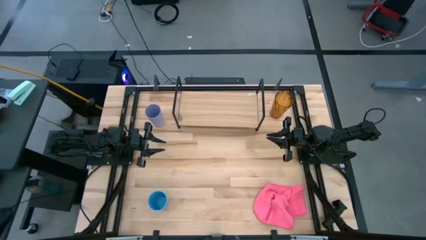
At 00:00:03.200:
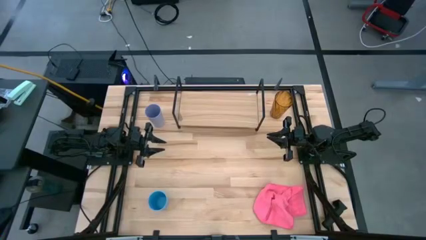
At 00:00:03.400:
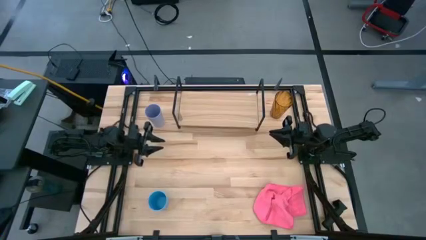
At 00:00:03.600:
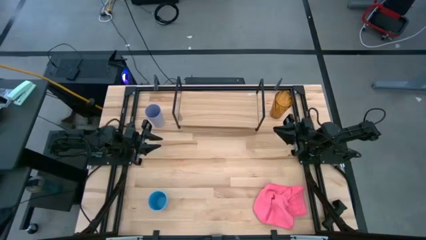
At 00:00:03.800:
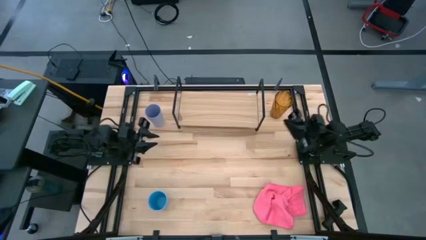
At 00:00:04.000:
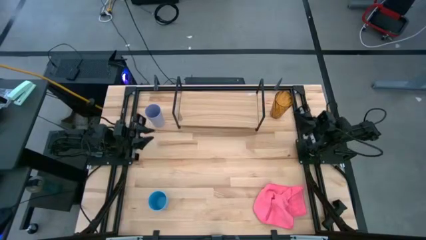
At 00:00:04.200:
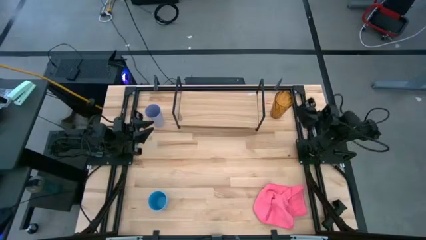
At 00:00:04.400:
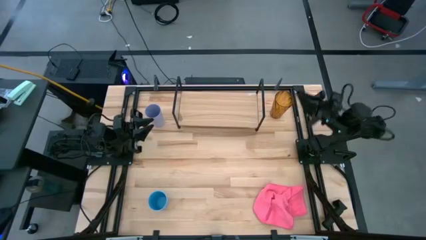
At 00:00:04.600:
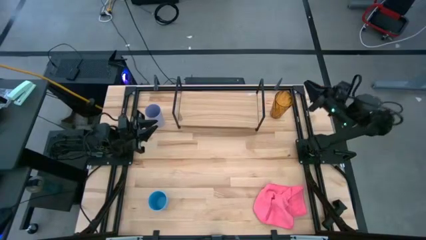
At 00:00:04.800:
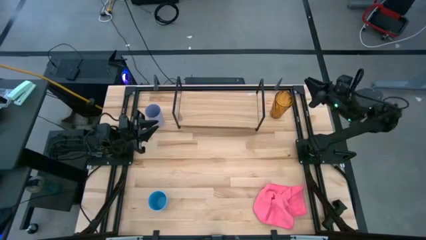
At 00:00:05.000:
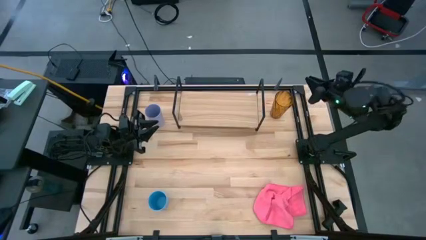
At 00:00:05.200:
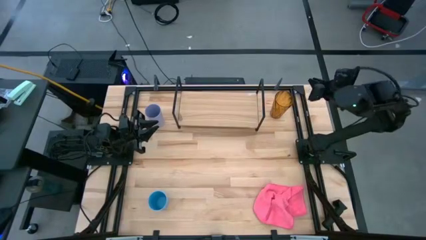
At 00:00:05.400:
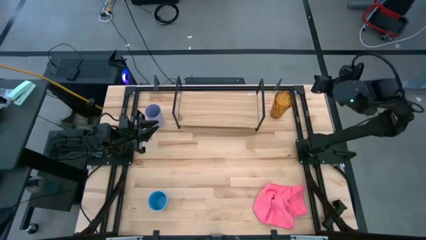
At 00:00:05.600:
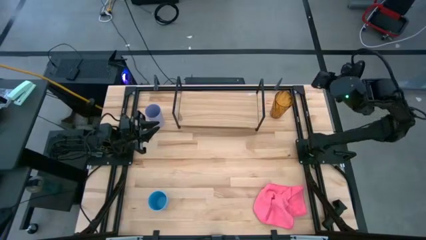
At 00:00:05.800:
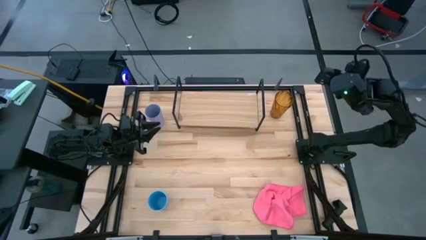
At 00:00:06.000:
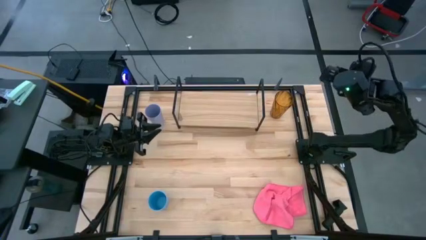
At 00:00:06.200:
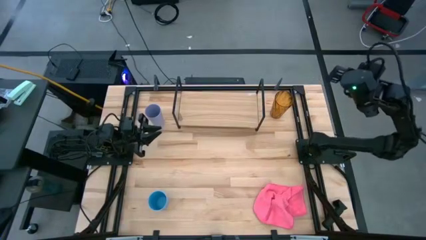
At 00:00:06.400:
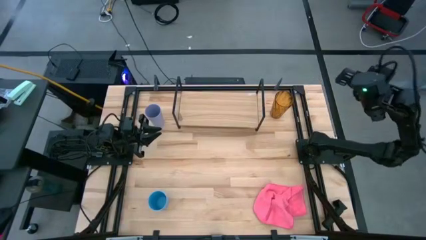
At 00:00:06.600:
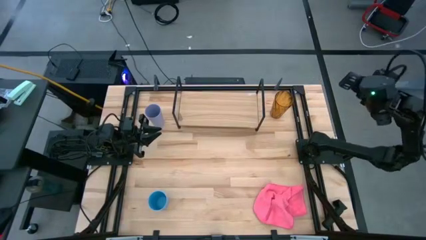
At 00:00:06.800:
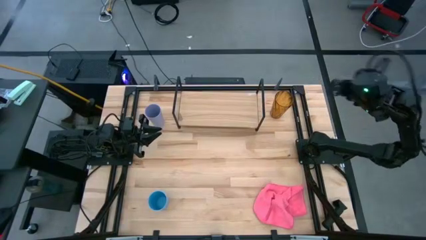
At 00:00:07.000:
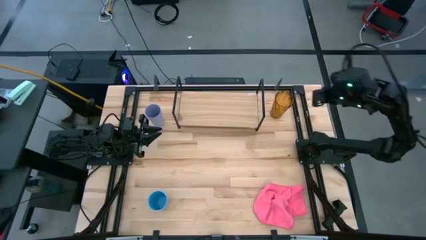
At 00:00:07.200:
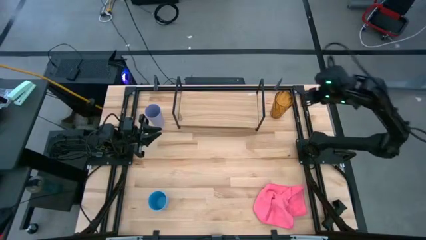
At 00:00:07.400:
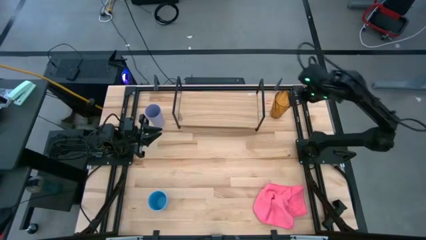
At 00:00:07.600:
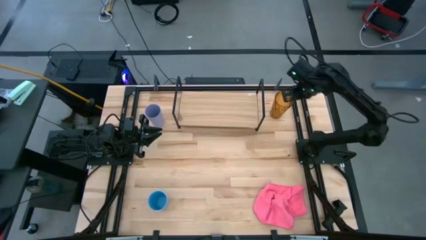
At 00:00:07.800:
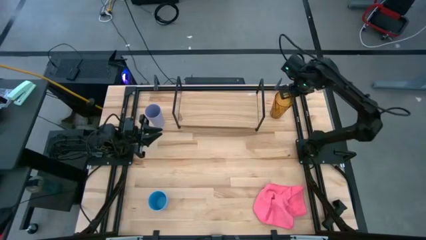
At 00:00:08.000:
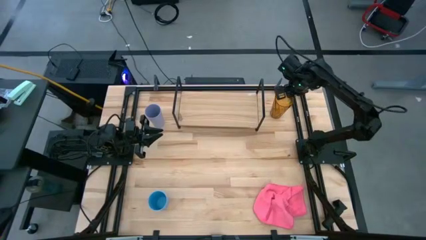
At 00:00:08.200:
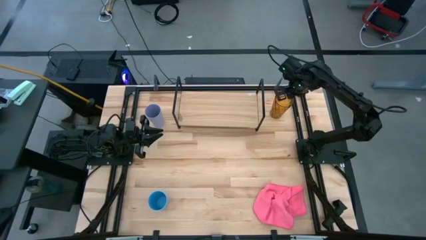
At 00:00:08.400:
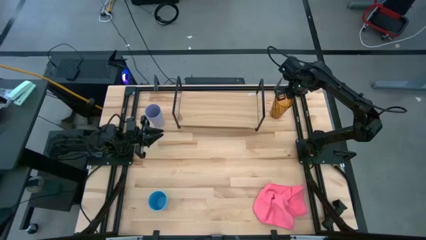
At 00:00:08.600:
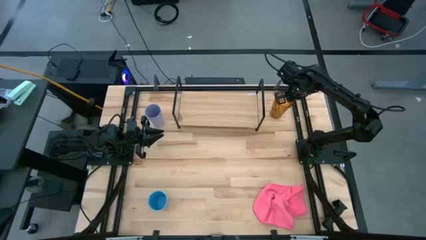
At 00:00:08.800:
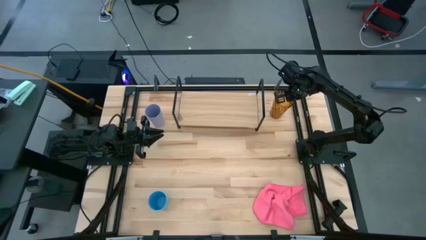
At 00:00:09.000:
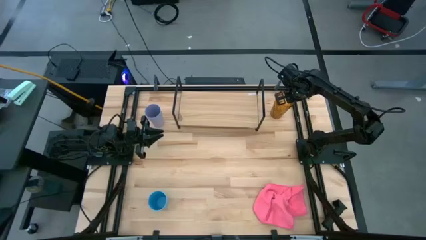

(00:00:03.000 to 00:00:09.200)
Task: Stack small to large cups/mugs on shelf
Put the brown glass on the shelf

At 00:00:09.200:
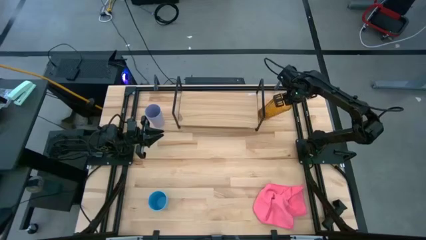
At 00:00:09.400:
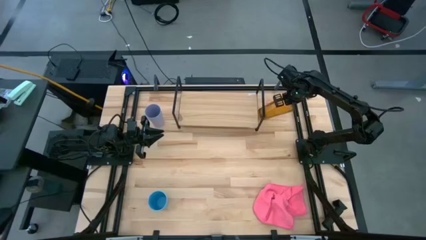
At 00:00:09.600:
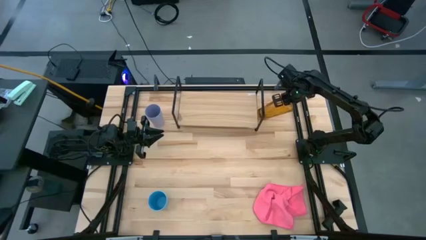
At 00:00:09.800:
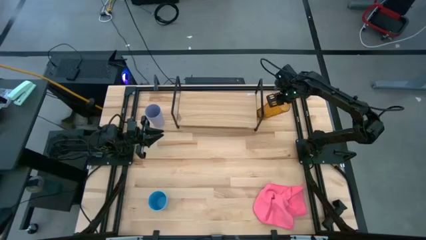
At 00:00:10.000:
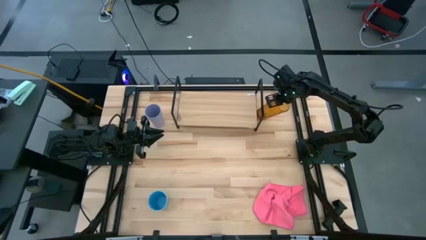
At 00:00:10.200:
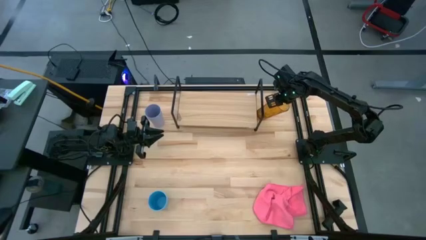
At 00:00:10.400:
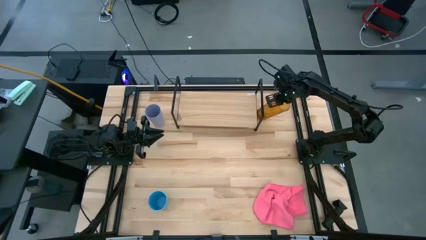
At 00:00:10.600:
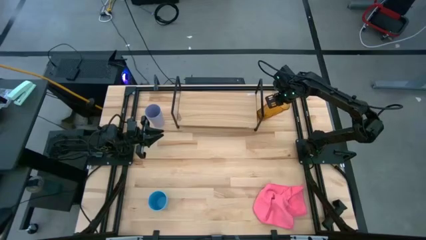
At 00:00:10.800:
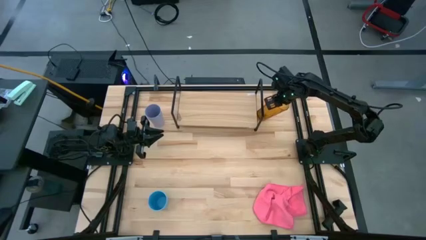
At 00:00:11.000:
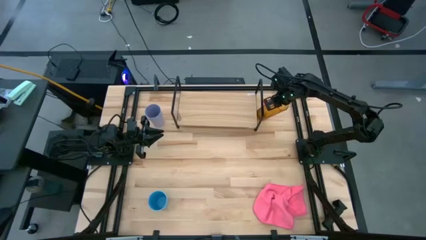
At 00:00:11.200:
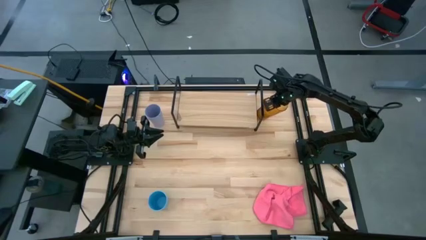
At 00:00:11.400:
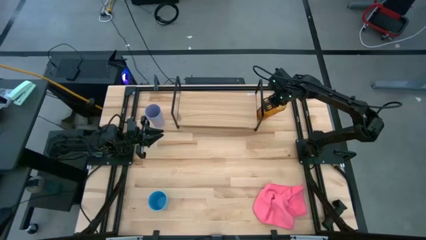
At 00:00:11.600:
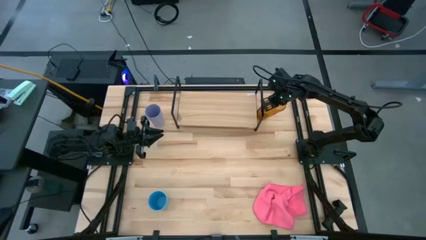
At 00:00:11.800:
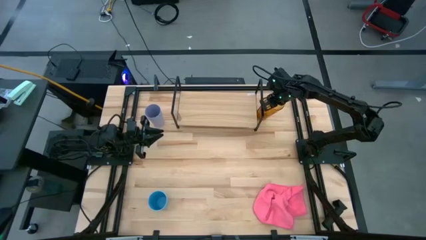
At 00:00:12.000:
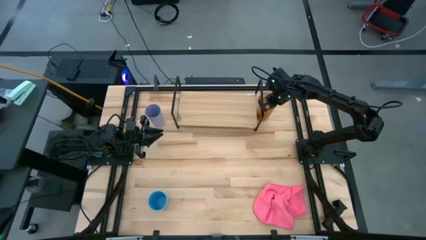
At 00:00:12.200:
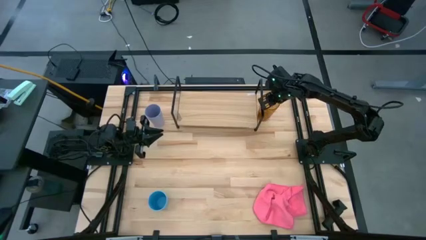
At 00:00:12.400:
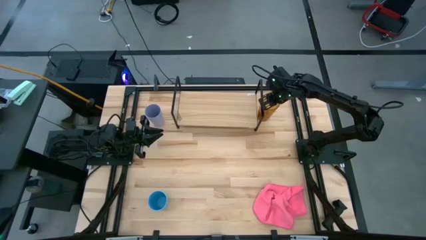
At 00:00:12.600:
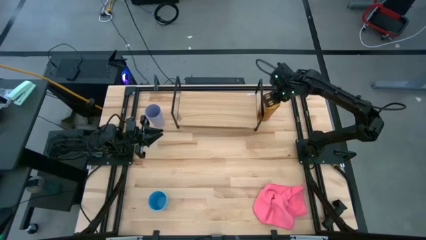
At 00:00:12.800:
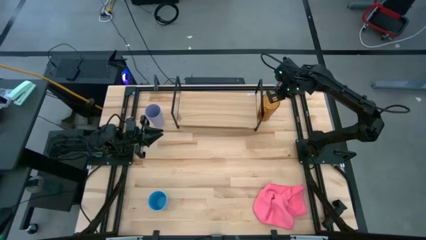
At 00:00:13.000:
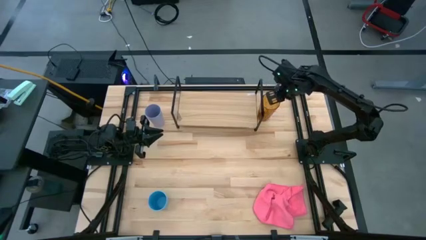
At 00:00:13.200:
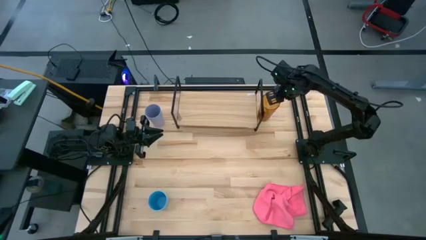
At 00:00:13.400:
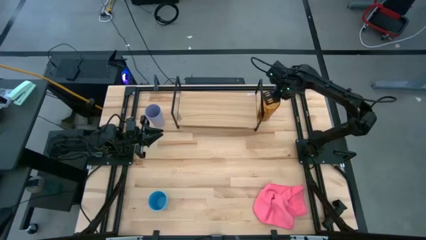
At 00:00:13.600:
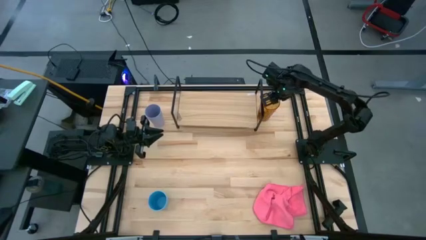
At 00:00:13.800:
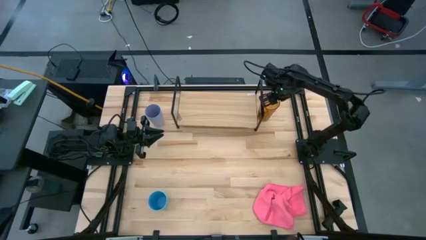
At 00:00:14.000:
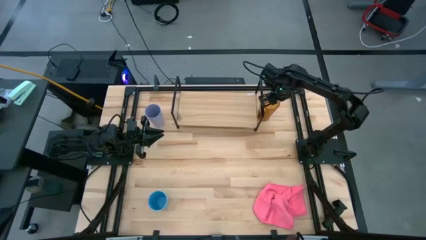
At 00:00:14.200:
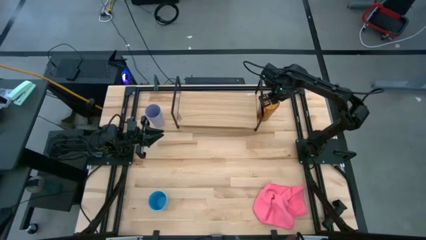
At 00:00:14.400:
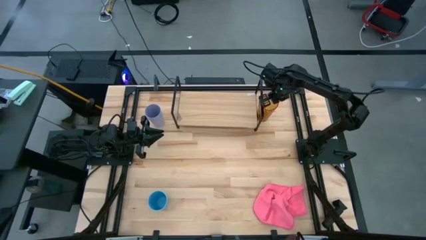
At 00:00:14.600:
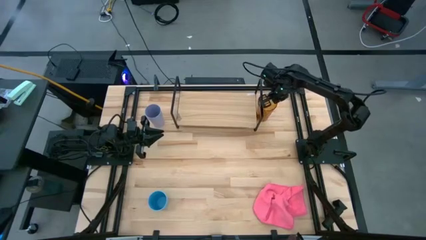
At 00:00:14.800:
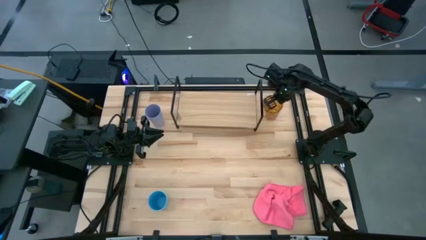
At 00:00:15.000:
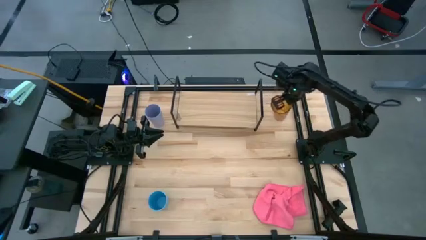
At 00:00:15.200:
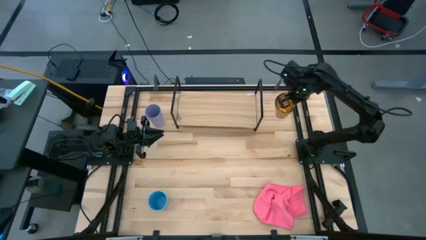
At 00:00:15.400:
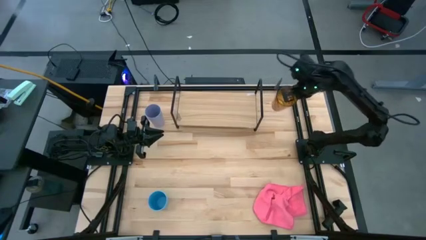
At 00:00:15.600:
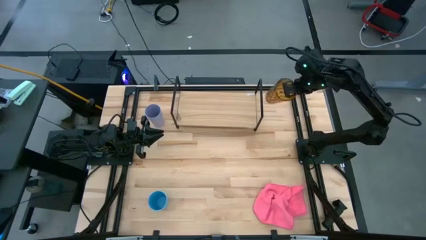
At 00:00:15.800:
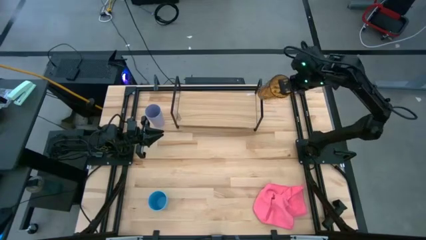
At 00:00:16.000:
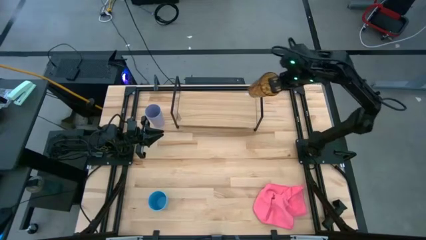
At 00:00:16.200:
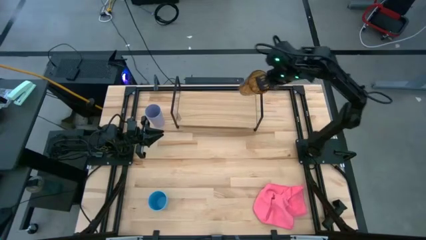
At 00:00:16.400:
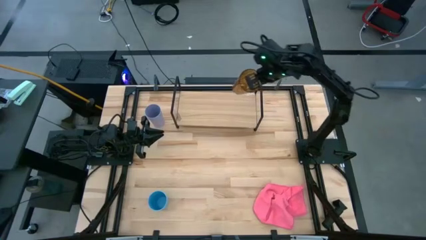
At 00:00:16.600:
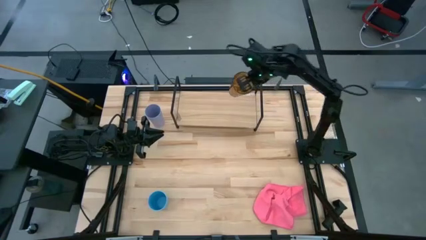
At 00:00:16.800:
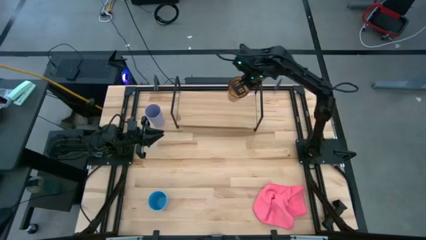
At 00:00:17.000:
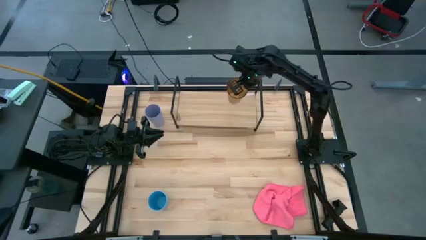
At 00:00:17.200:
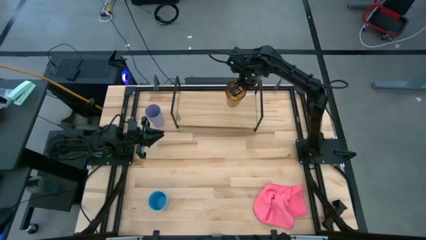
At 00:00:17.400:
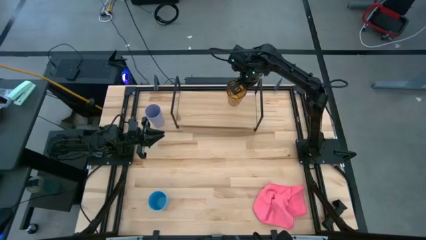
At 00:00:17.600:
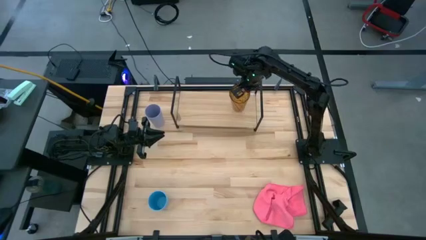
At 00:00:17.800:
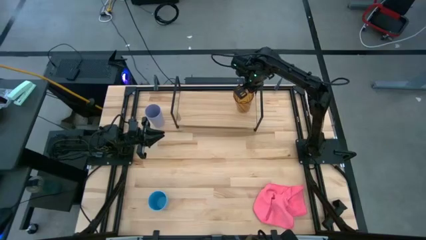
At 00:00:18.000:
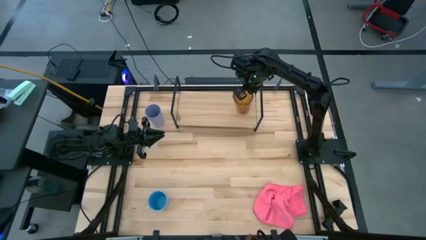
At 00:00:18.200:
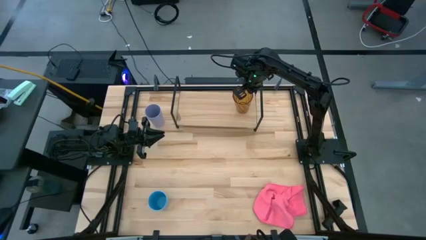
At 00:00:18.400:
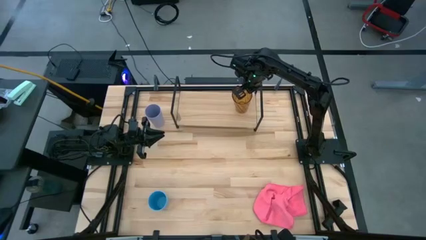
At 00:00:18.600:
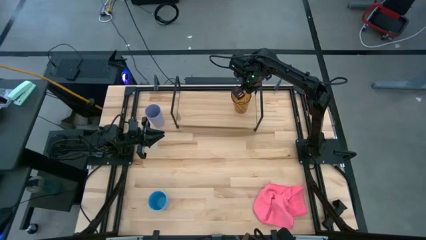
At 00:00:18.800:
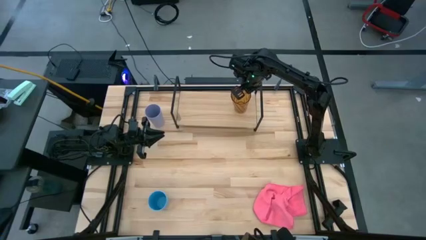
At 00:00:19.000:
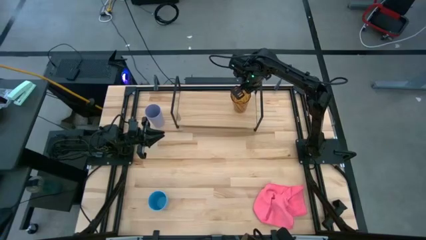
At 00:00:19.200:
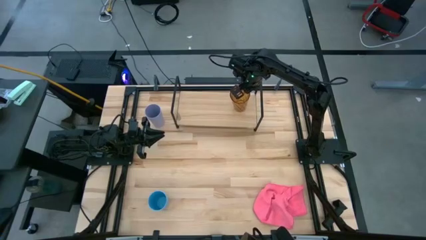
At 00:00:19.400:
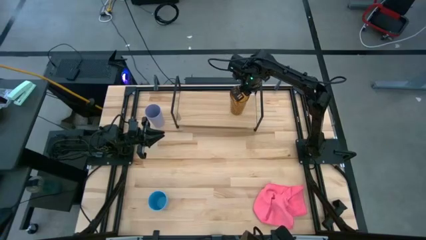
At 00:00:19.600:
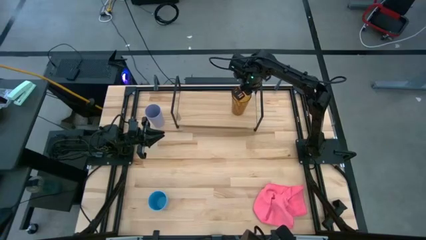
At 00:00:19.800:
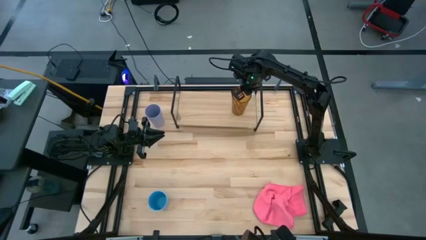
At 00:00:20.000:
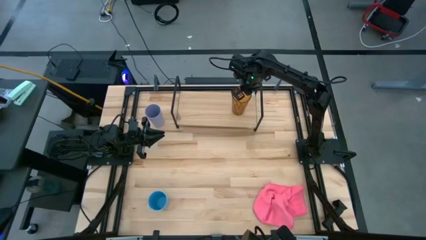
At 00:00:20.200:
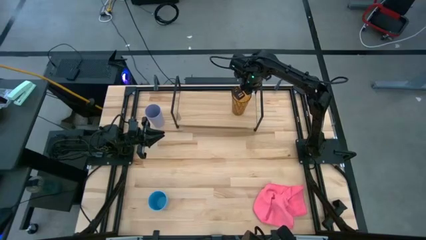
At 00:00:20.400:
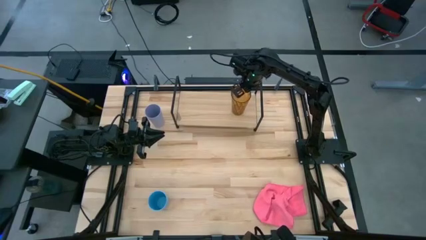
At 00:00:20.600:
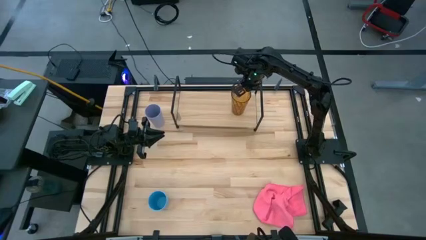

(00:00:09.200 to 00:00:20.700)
Put the brown glass on the shelf
